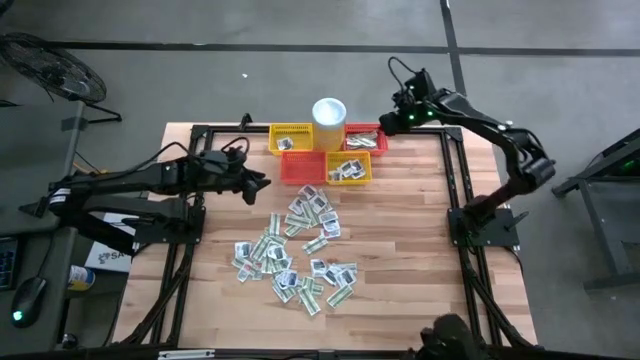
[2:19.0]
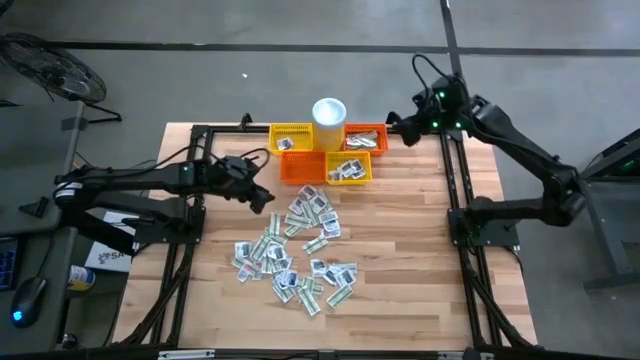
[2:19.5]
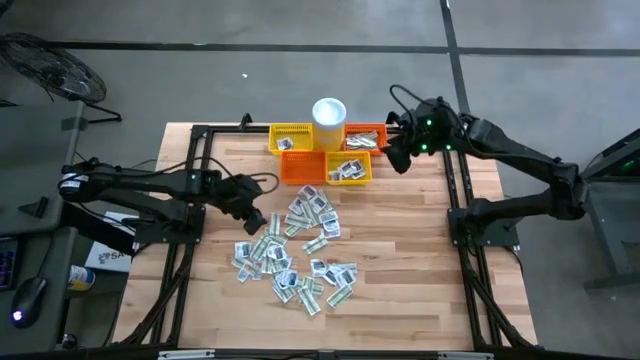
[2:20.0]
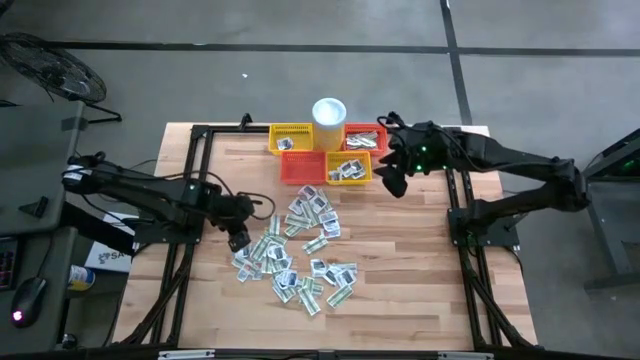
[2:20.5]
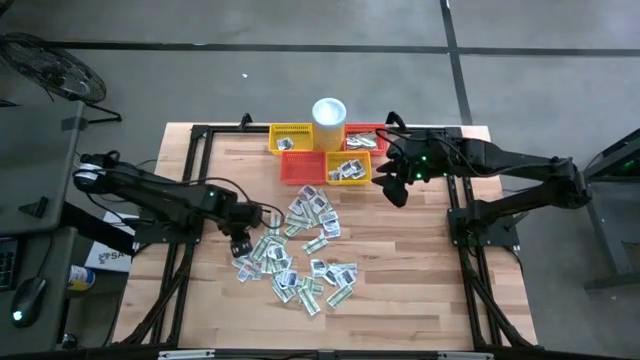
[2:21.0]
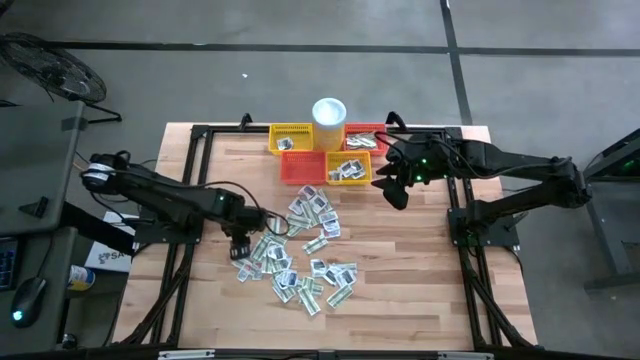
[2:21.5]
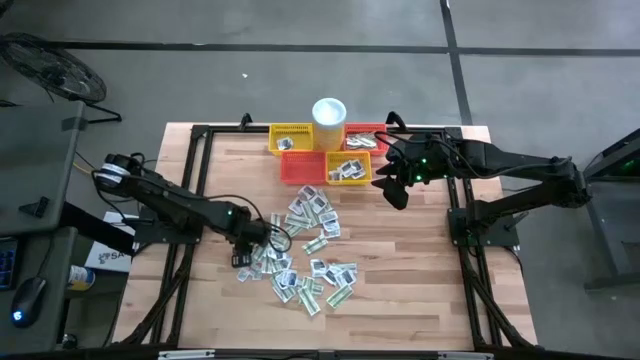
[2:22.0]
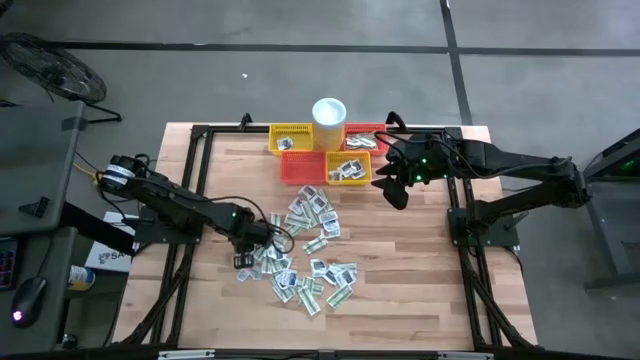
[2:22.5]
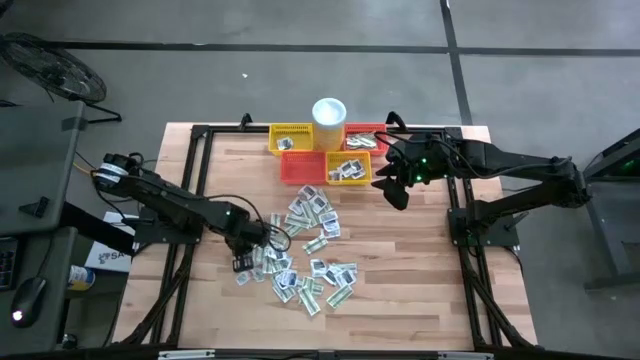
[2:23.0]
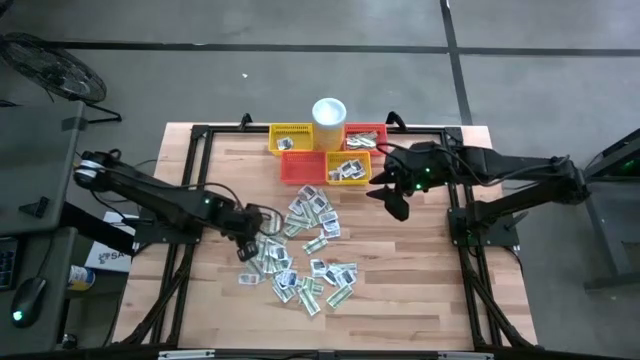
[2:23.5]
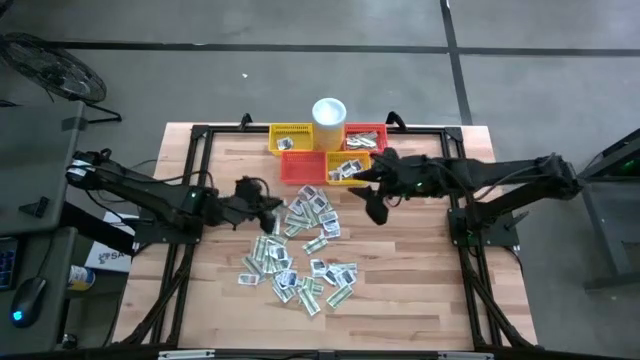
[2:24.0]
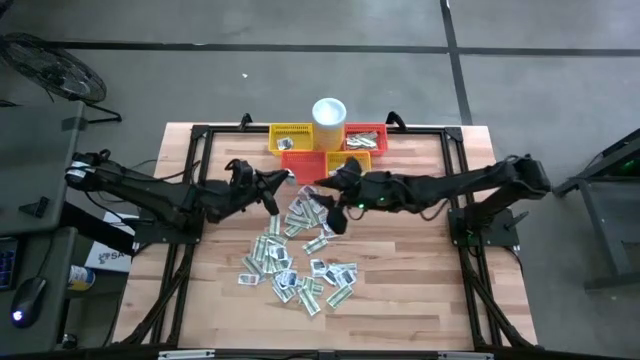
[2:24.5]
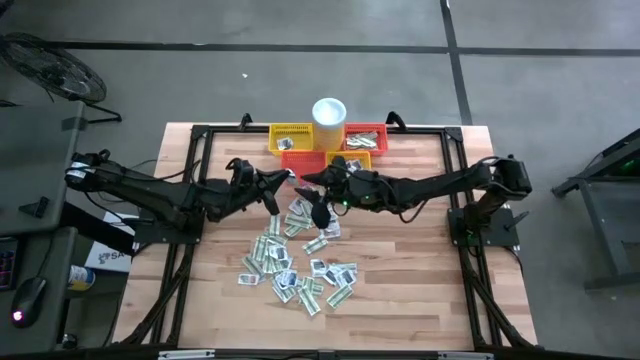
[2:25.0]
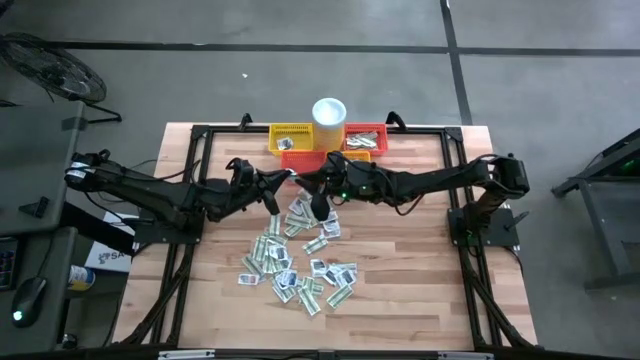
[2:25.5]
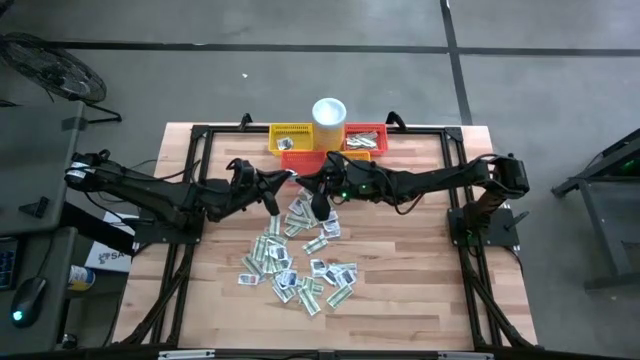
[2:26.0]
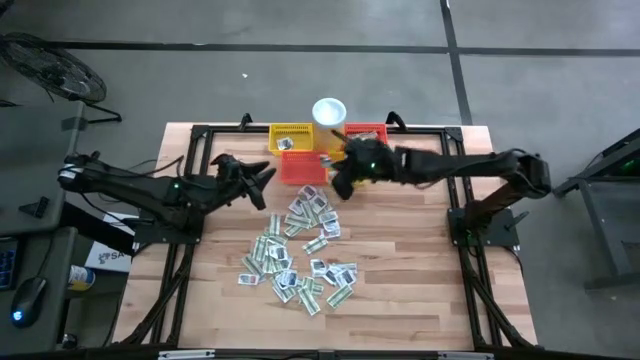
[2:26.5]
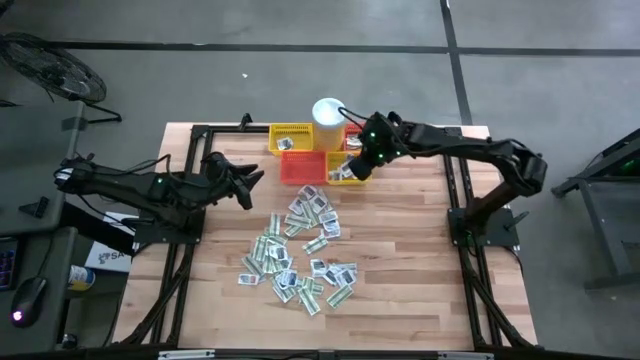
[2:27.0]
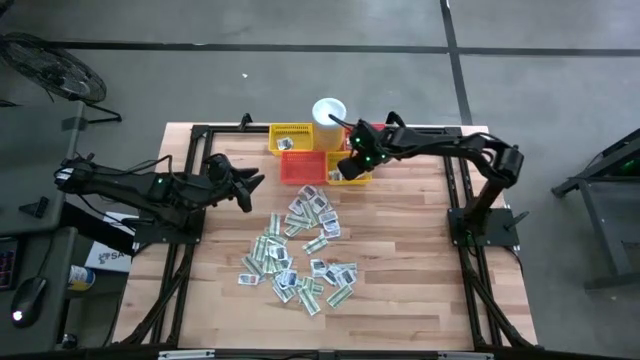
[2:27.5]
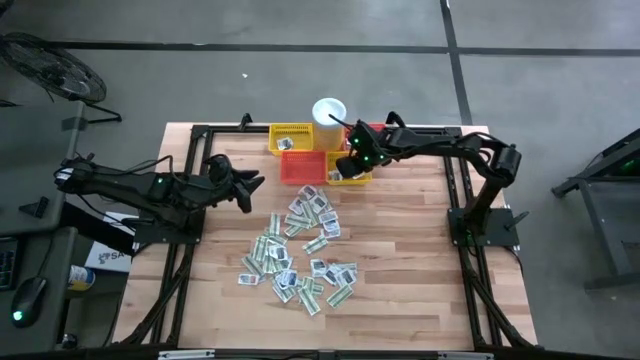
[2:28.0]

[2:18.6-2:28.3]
Task: Pick & Place First Aid Supplies
Put the black towelette pack into the bottom yellow basket

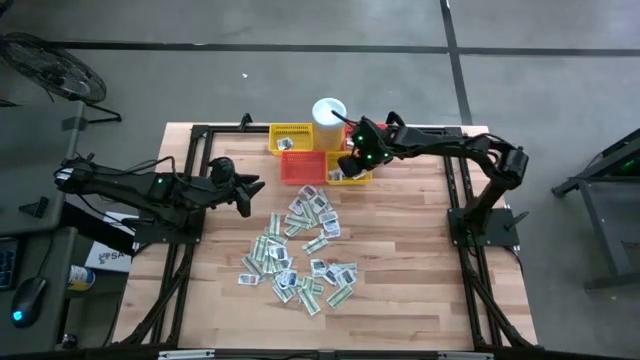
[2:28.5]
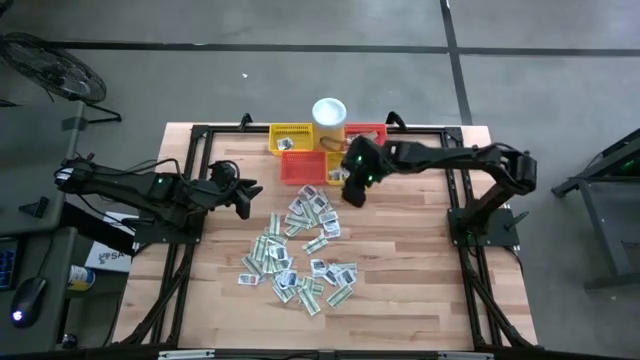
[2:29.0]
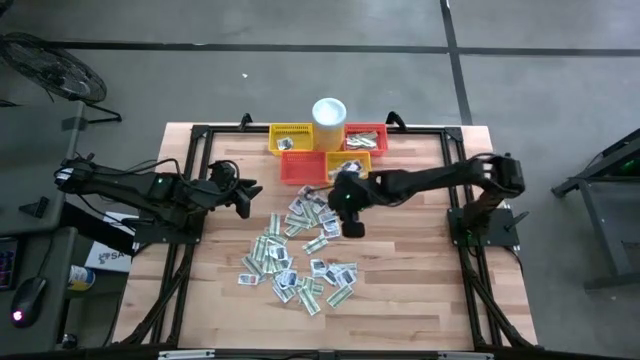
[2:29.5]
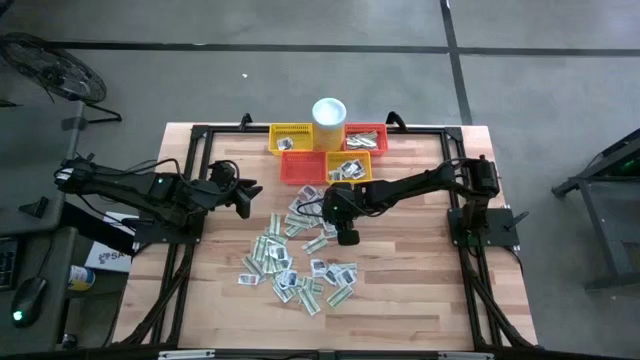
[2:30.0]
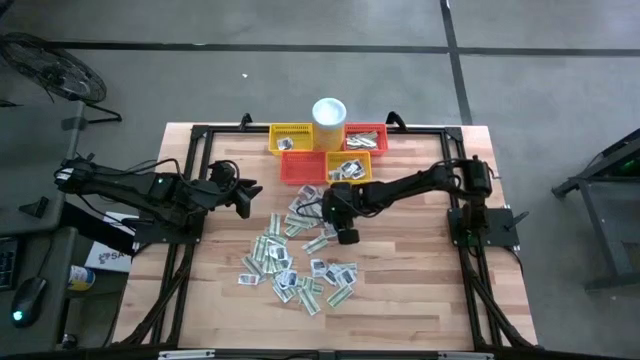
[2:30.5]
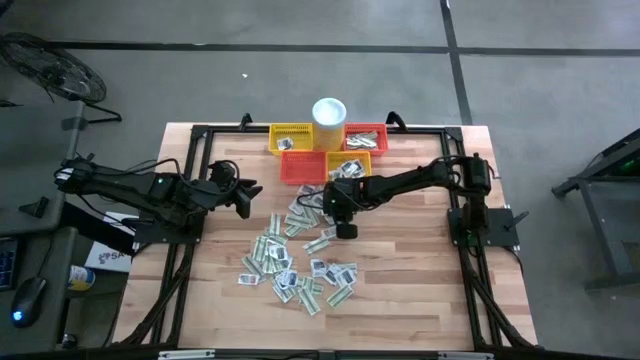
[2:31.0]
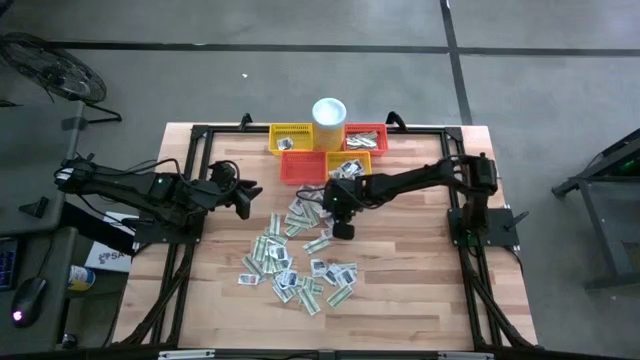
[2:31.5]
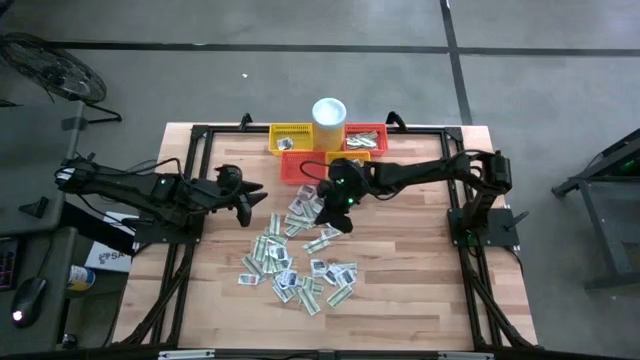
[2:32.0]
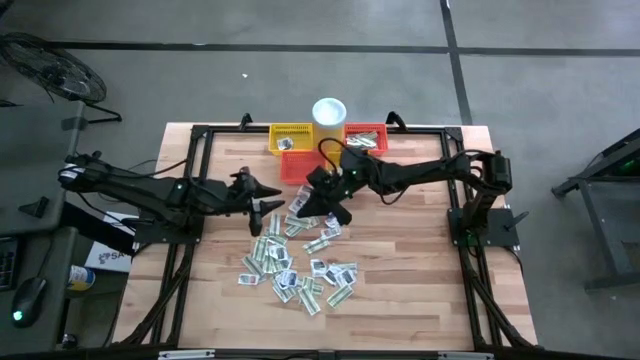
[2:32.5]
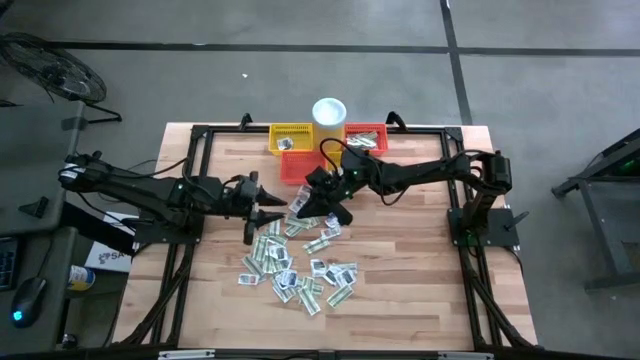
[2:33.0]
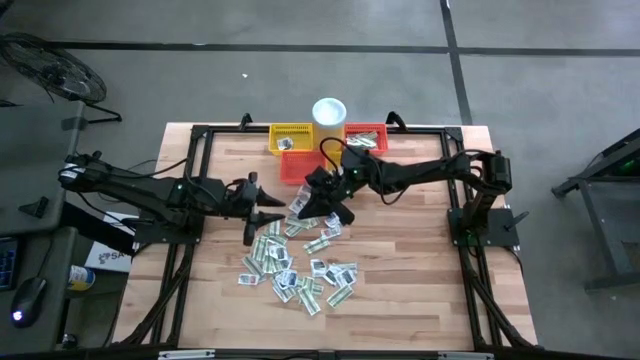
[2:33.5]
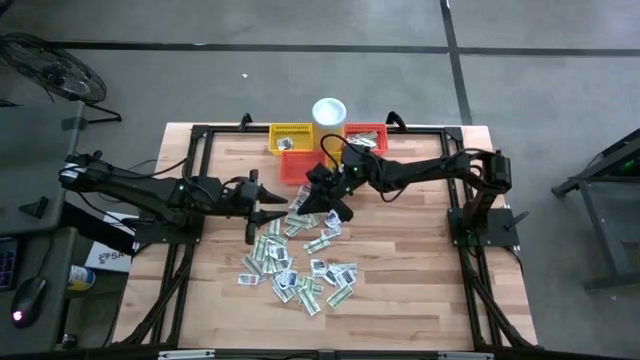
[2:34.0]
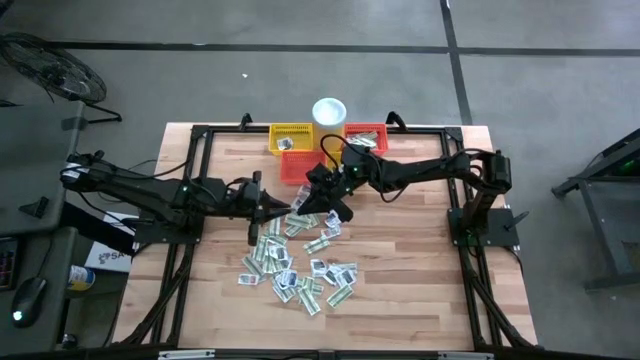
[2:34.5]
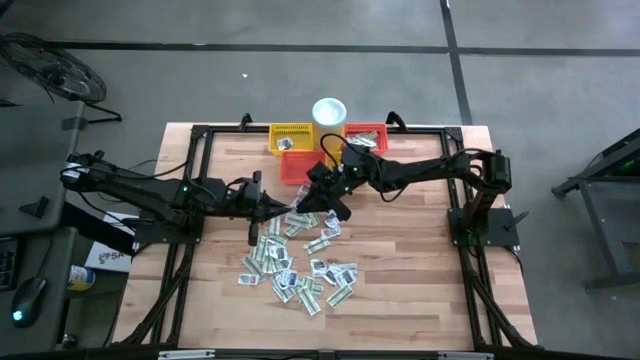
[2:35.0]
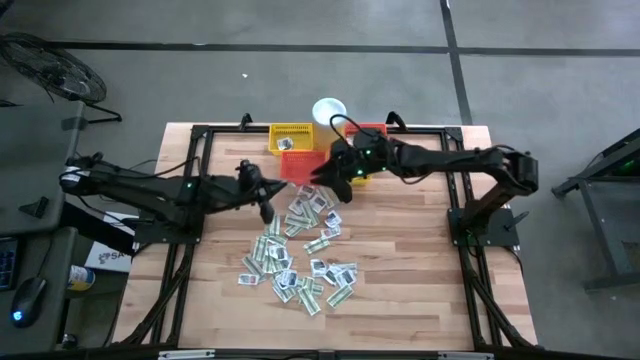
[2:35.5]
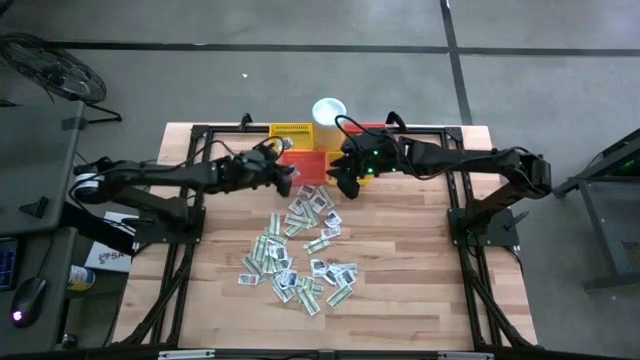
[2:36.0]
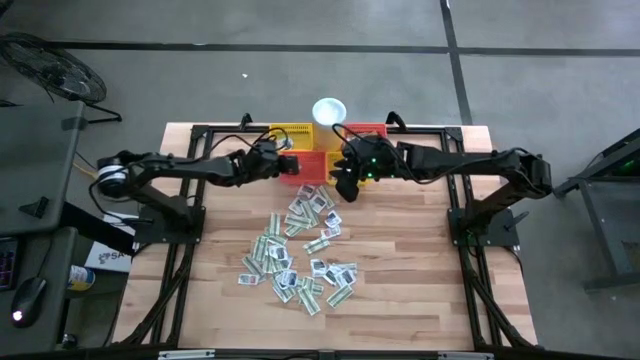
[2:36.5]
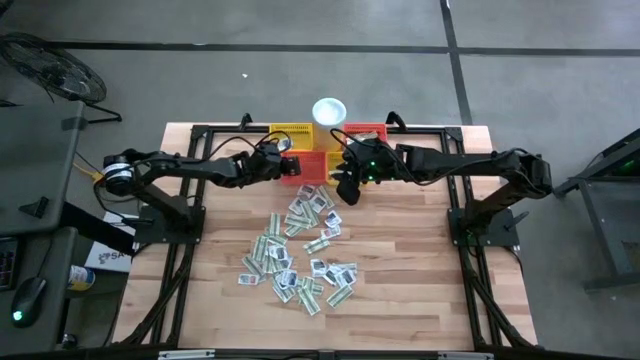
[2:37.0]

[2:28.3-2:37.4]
Put the orange ointment pack into the bottom orange basket
